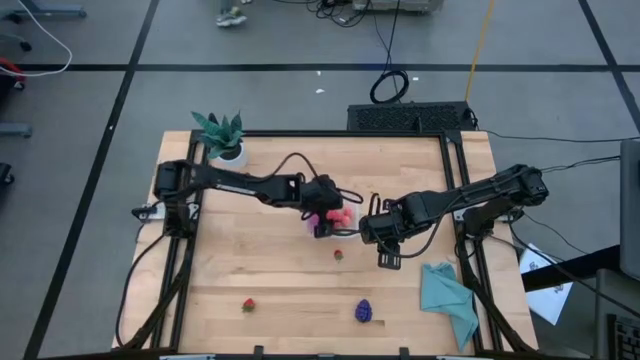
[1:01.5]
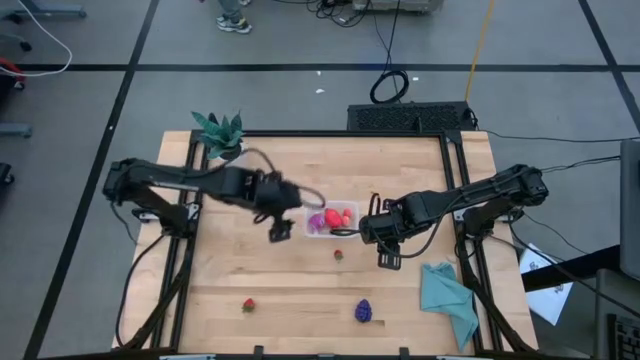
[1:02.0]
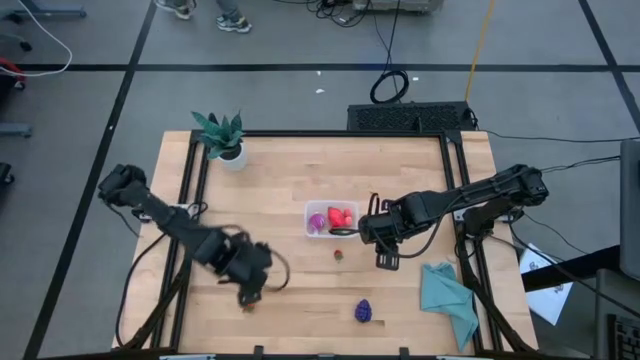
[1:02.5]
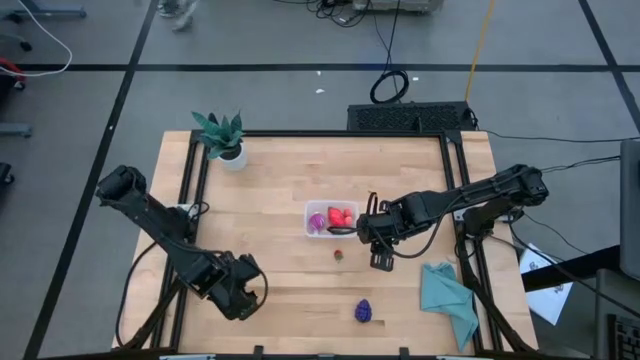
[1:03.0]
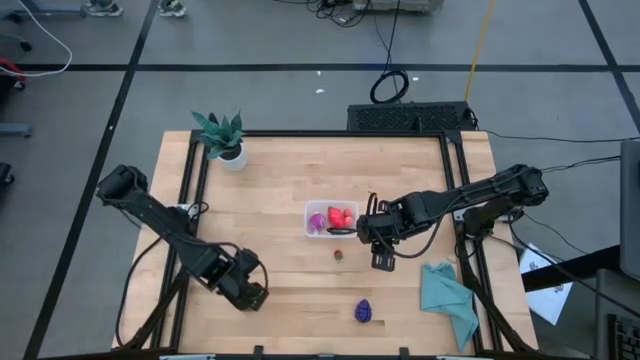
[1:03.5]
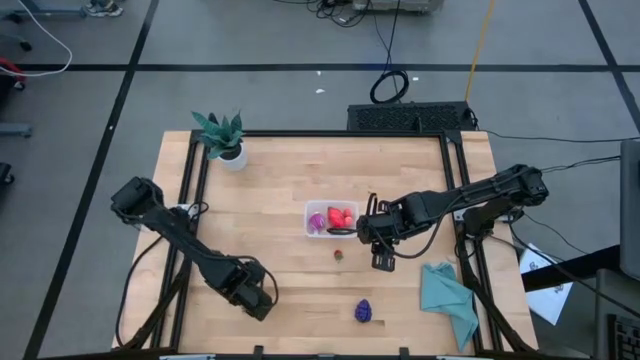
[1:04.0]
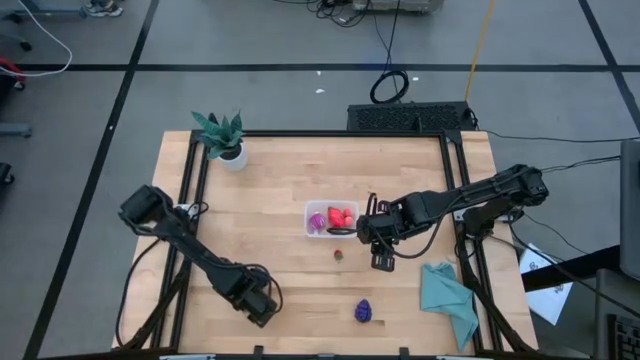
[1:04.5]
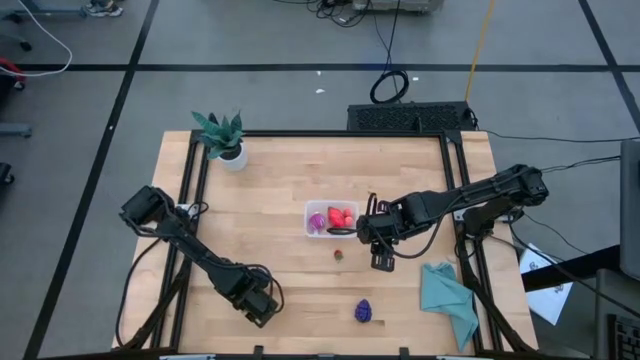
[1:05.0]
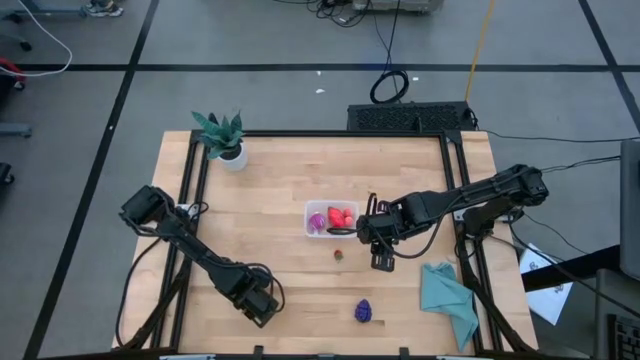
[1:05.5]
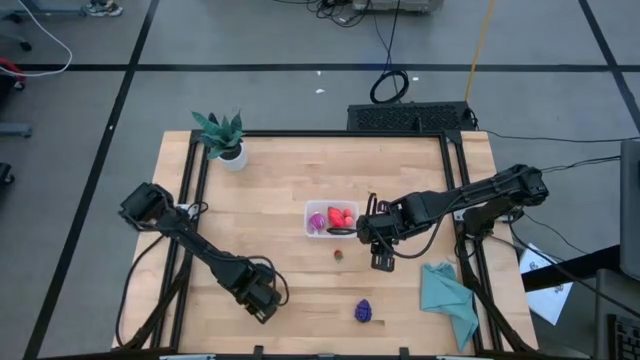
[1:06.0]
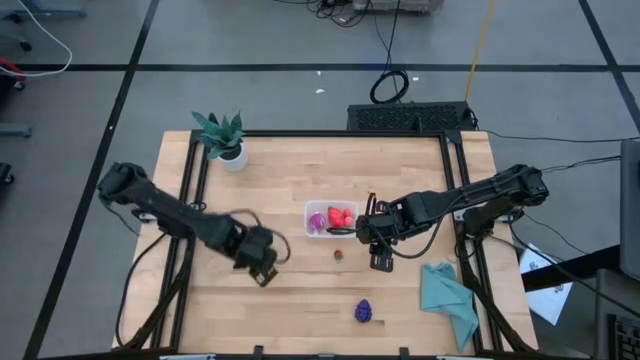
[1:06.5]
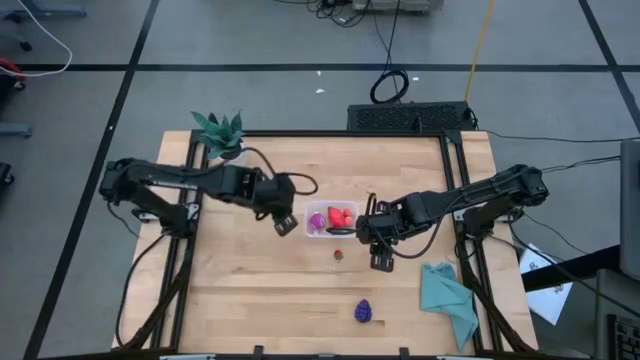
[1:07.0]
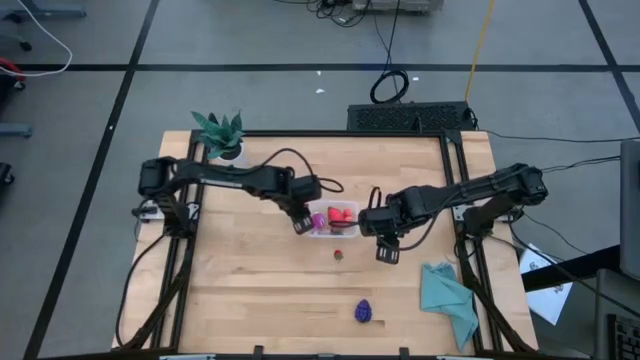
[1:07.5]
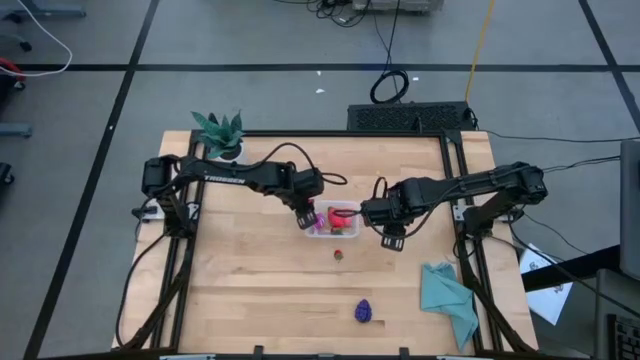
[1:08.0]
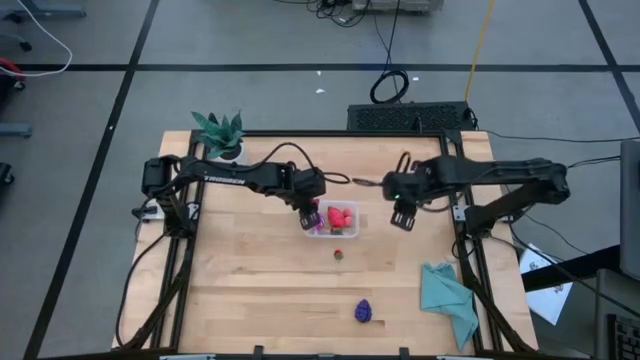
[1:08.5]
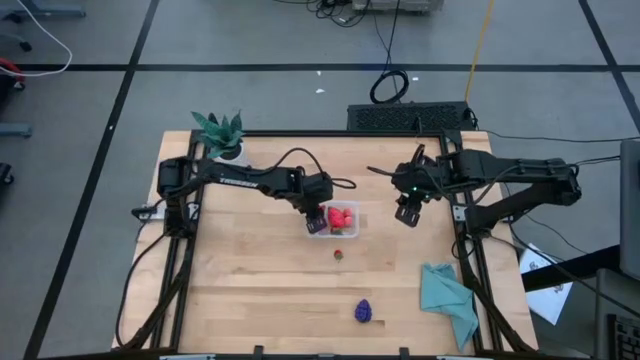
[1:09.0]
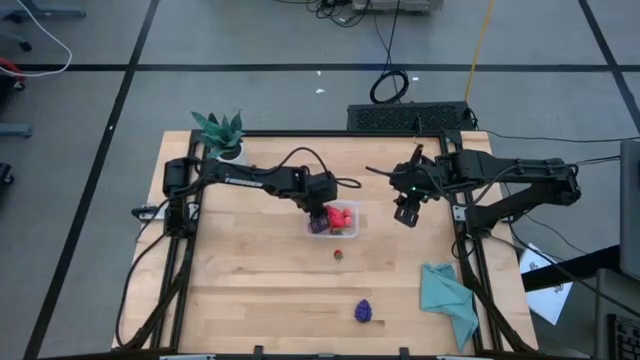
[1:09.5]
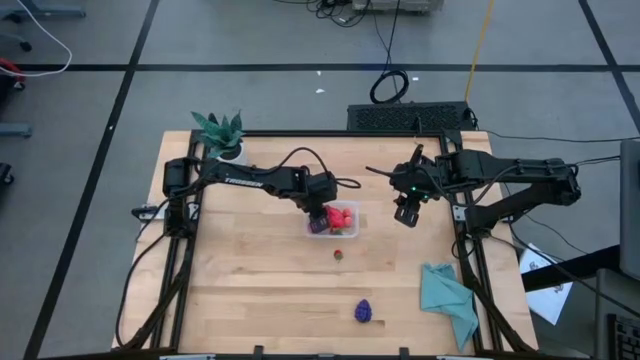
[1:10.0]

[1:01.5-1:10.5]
Task: Pick and placing Produce into tupperware
Put the left red strawberry into the transparent bin

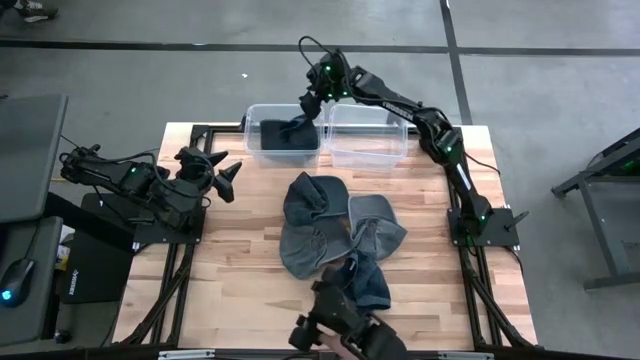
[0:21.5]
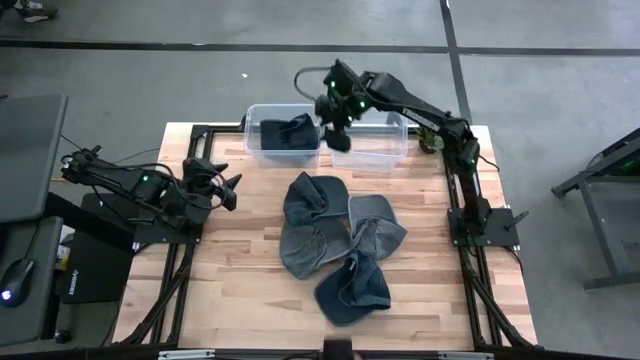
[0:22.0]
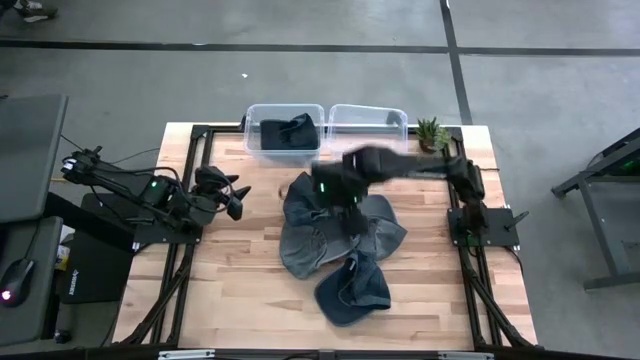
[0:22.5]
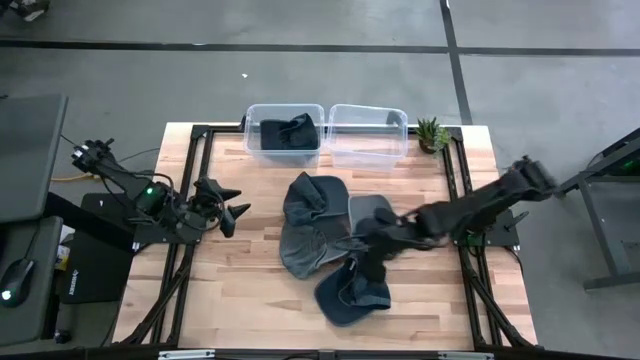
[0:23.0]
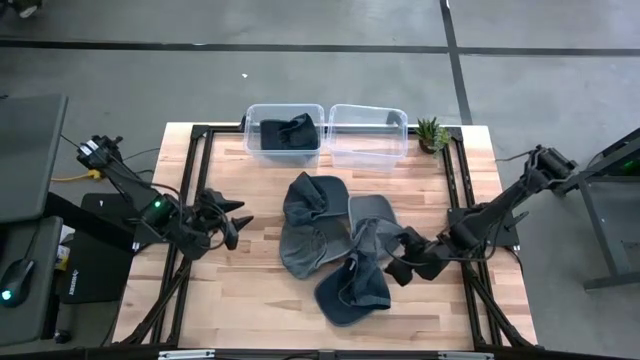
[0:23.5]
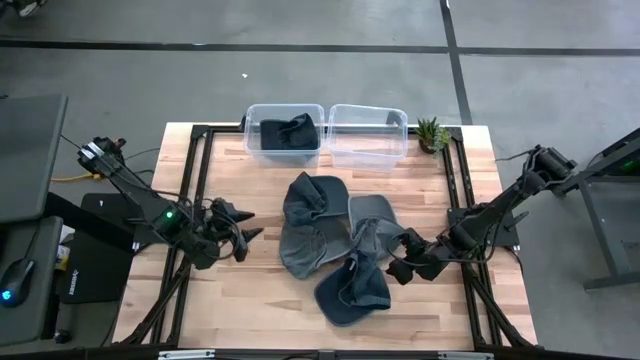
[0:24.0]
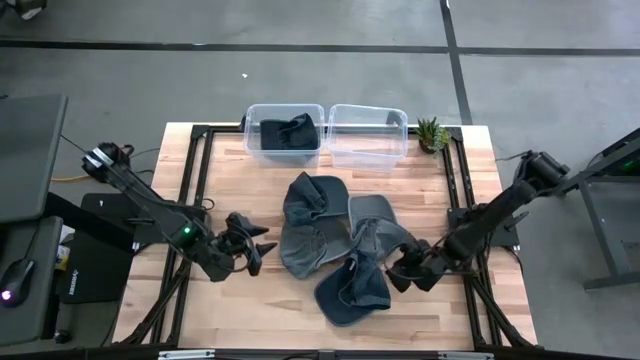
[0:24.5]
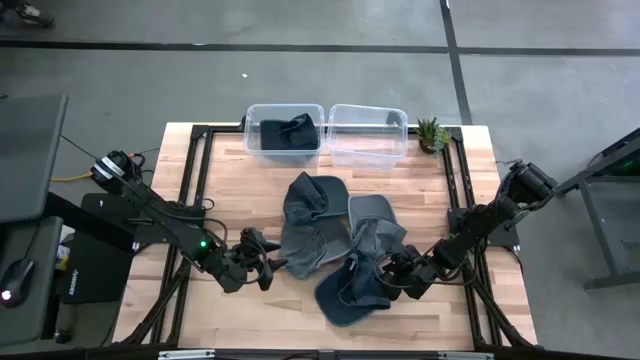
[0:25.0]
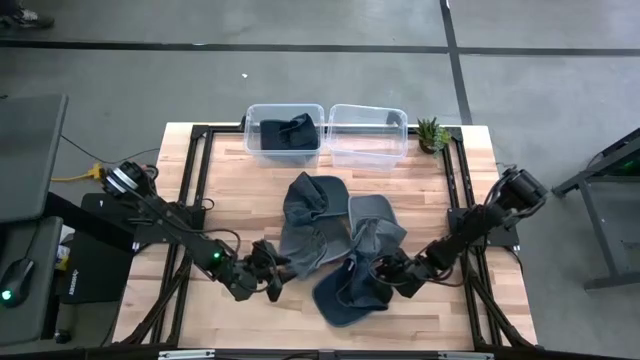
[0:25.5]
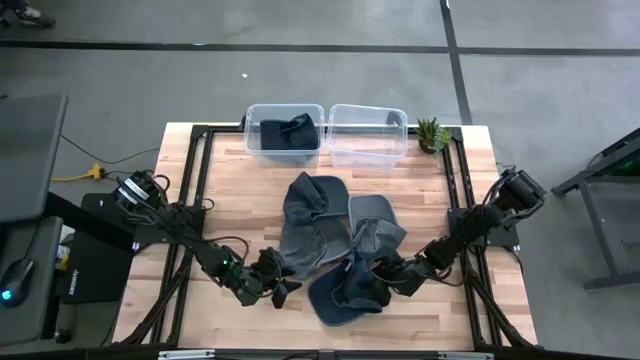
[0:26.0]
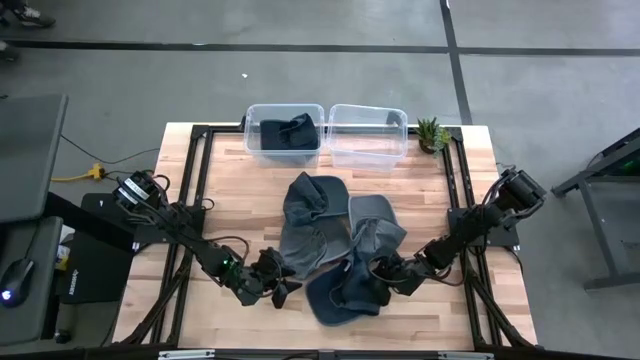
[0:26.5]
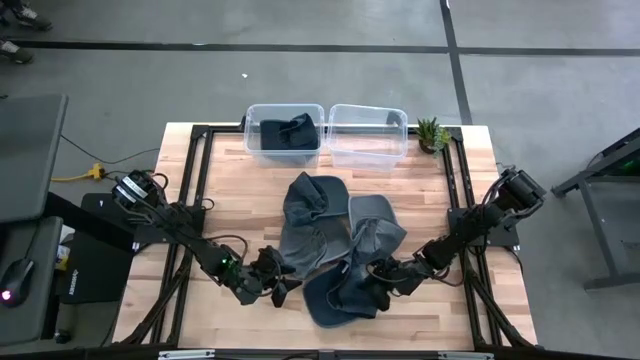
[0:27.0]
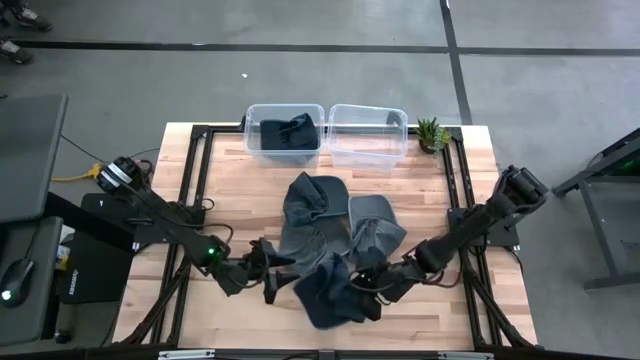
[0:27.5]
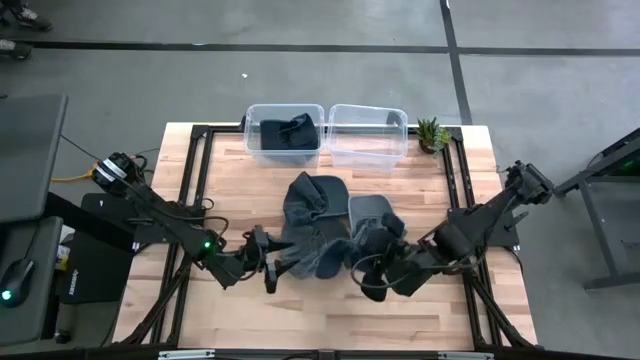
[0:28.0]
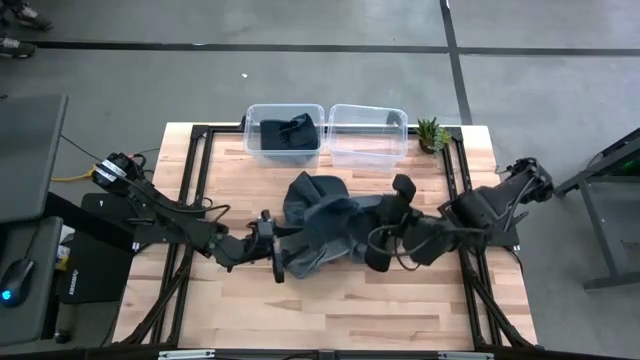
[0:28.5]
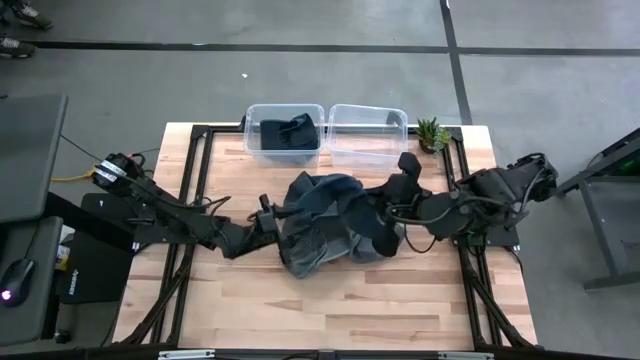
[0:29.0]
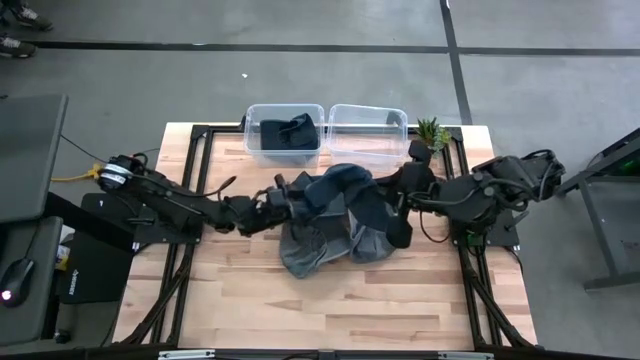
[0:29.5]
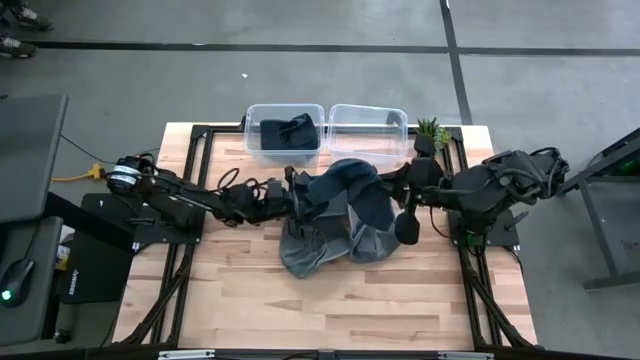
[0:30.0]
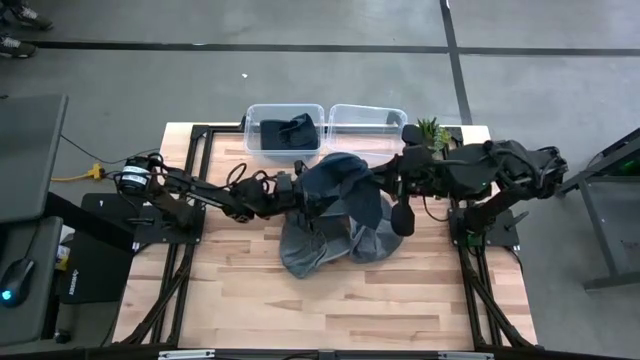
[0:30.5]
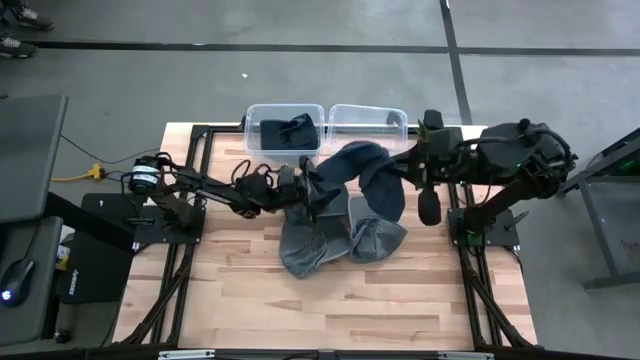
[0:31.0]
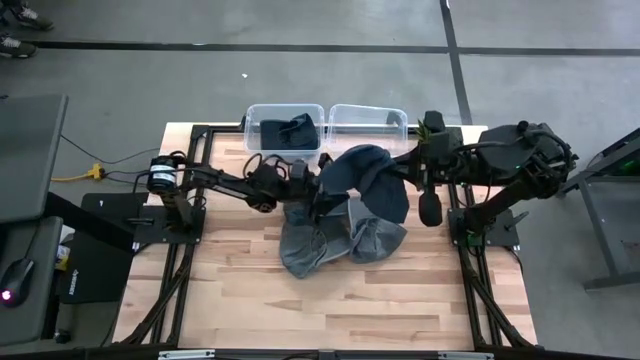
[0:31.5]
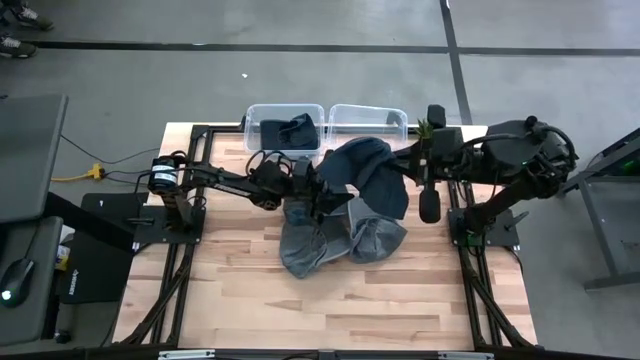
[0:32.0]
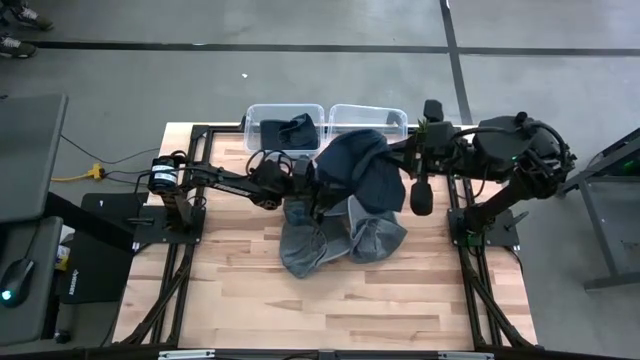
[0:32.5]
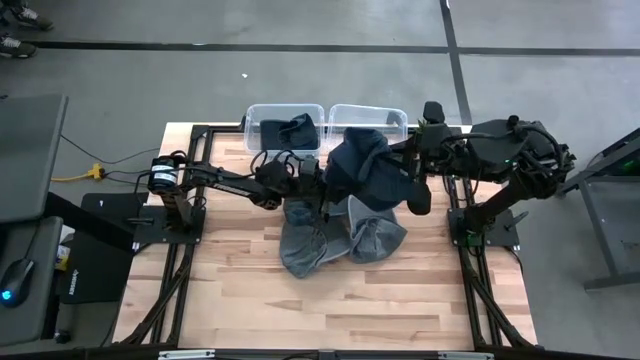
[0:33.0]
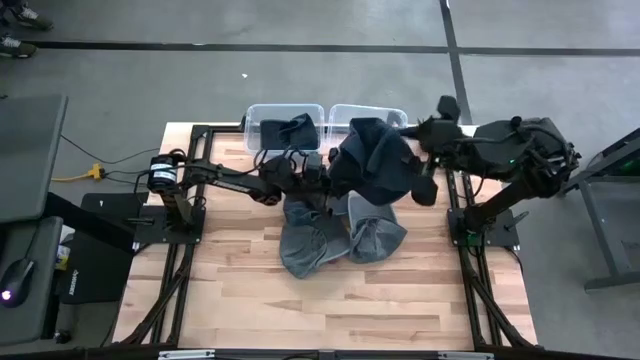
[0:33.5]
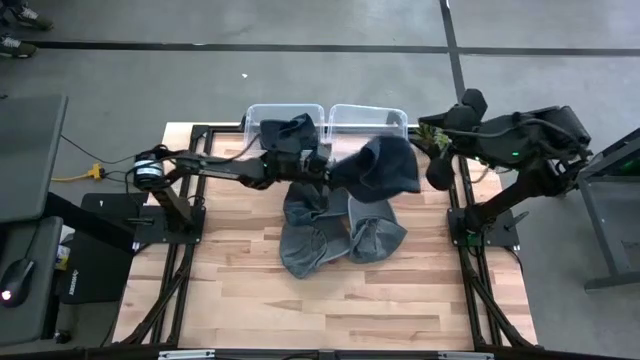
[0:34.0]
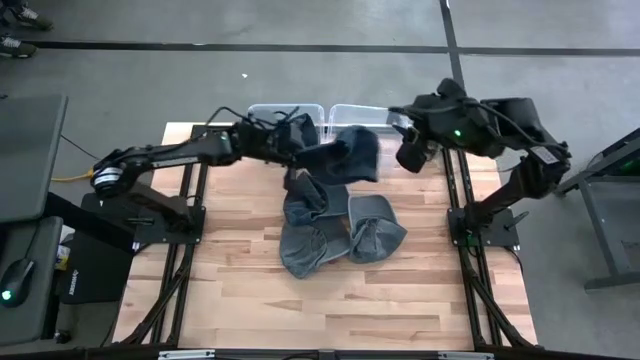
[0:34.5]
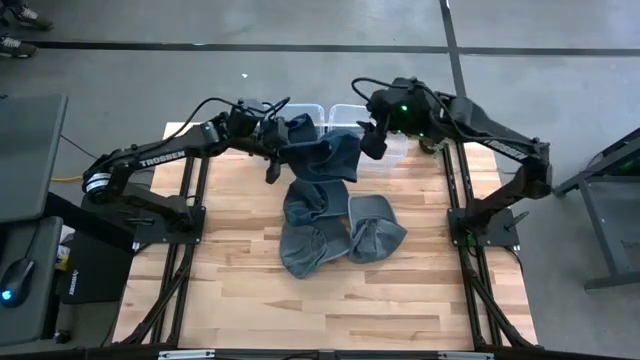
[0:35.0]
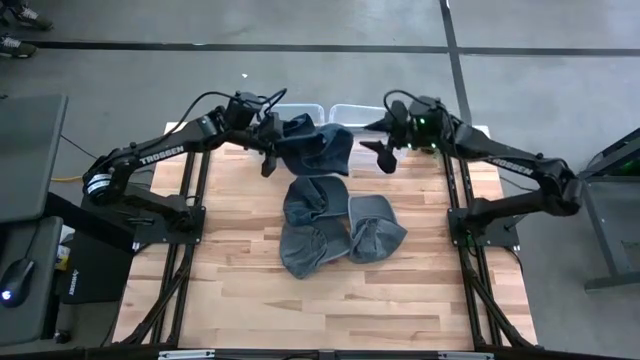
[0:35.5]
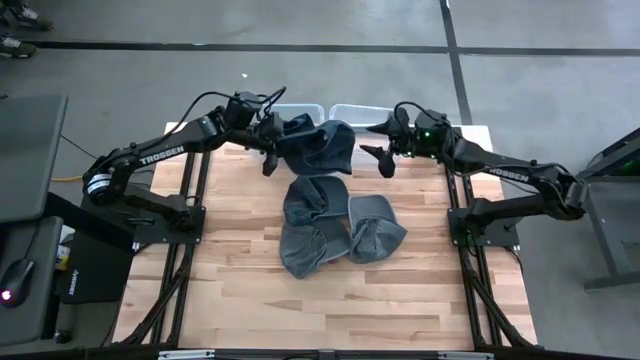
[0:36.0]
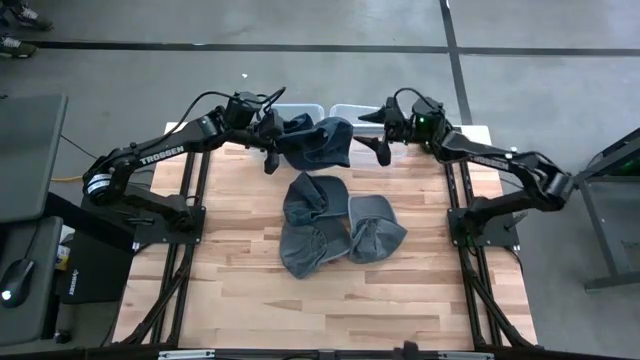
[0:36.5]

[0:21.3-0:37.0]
Task: Pick and place caps into container
Put the bottom dark blue cap into the left transparent container
